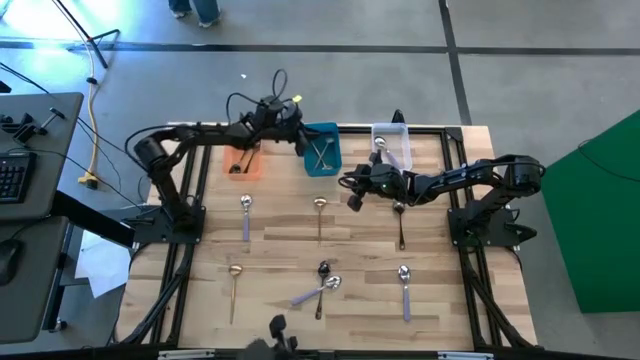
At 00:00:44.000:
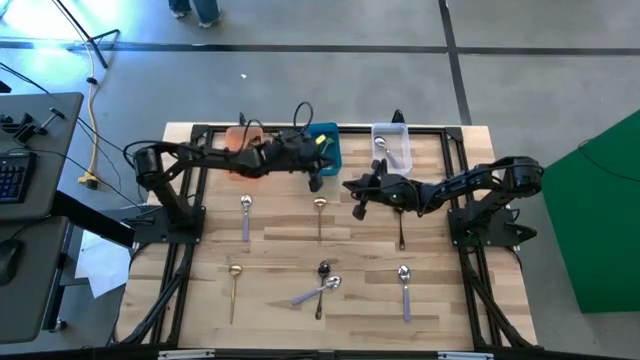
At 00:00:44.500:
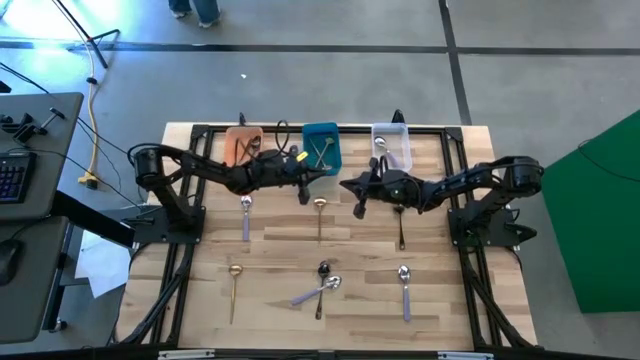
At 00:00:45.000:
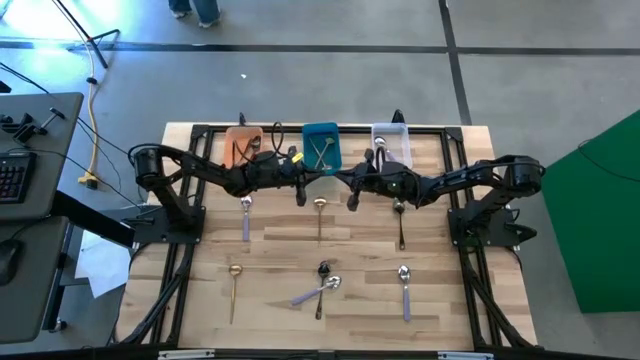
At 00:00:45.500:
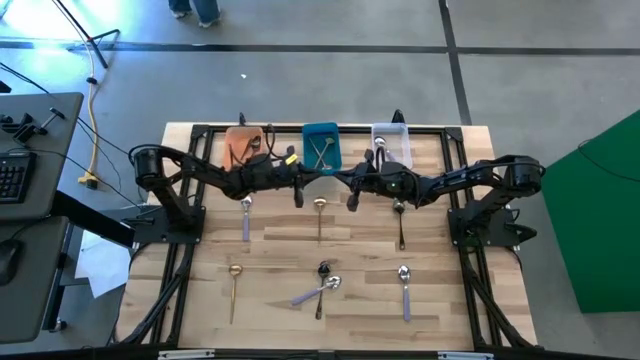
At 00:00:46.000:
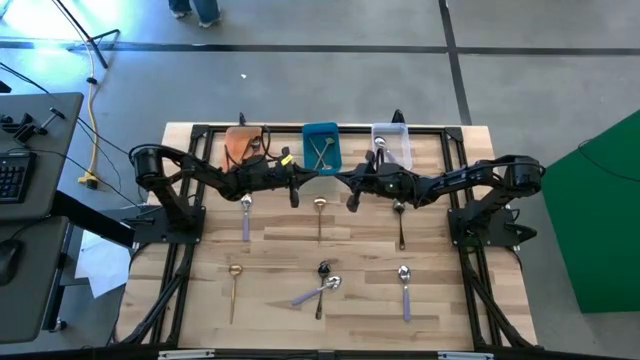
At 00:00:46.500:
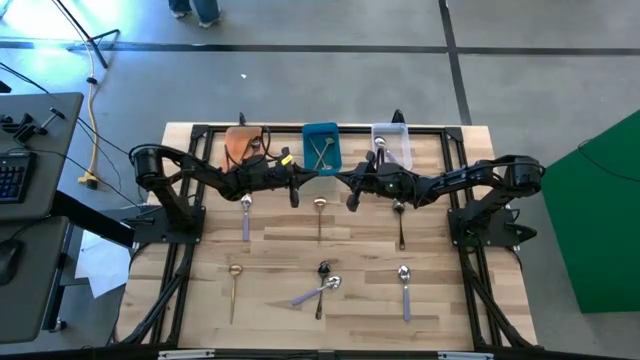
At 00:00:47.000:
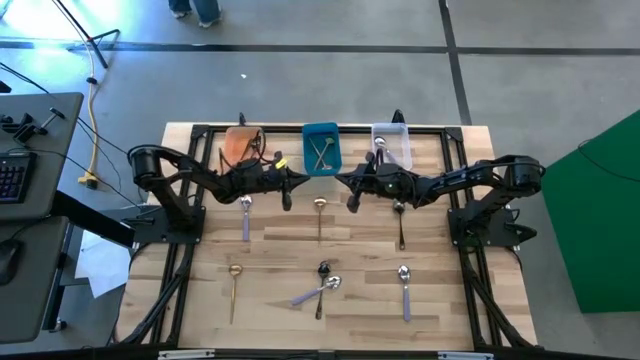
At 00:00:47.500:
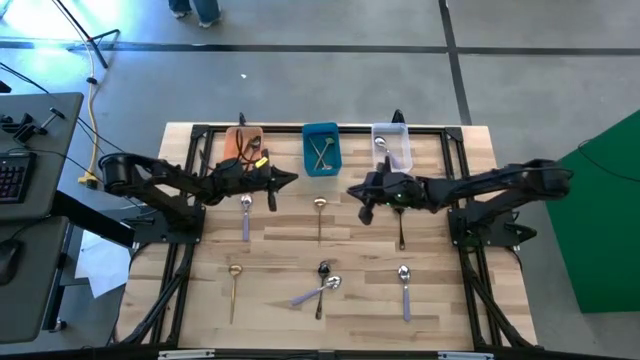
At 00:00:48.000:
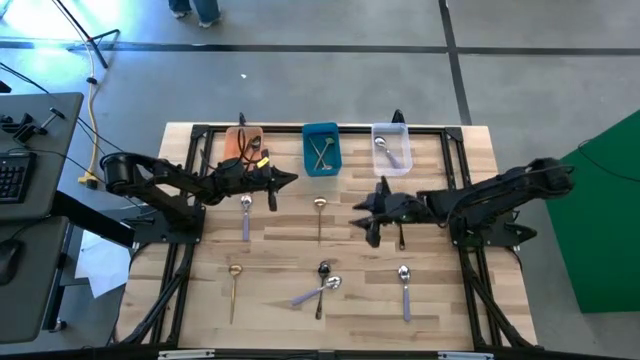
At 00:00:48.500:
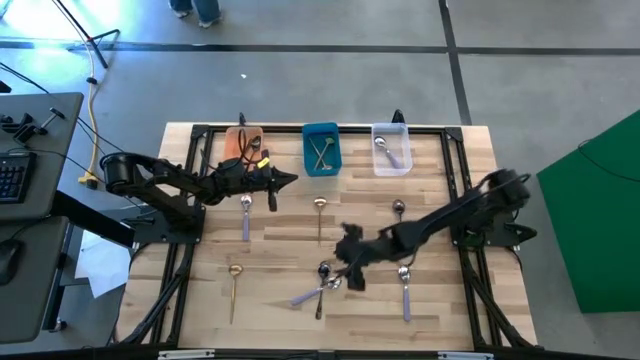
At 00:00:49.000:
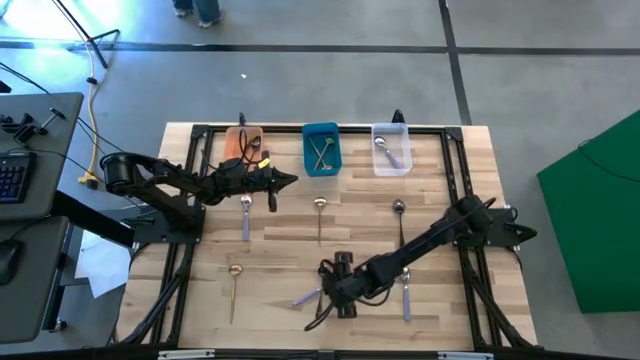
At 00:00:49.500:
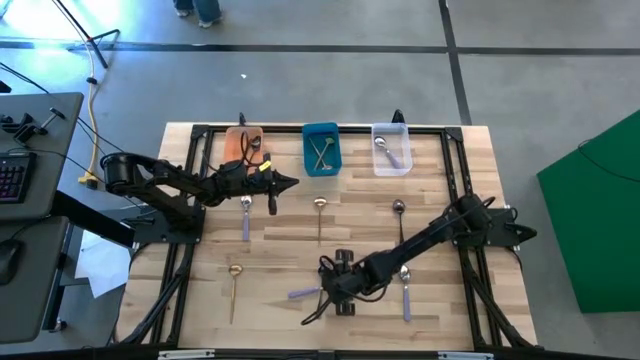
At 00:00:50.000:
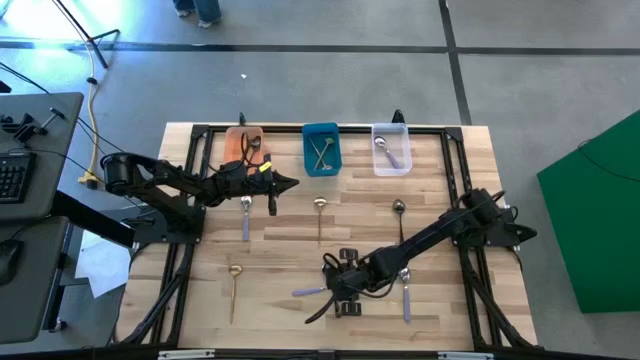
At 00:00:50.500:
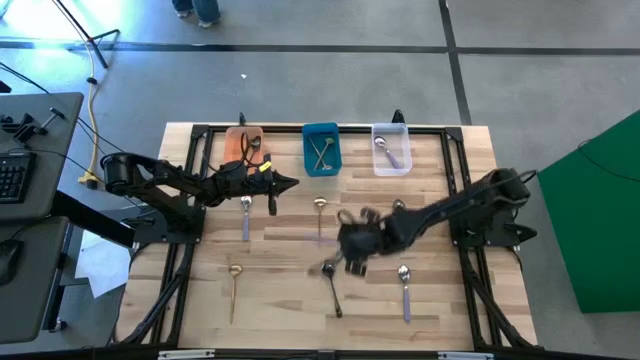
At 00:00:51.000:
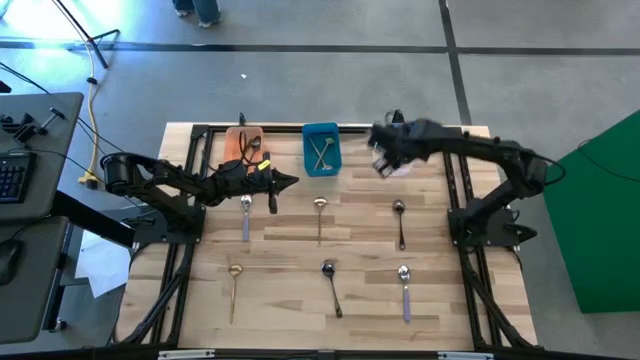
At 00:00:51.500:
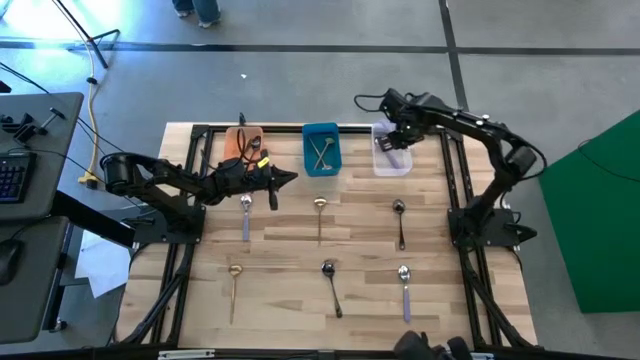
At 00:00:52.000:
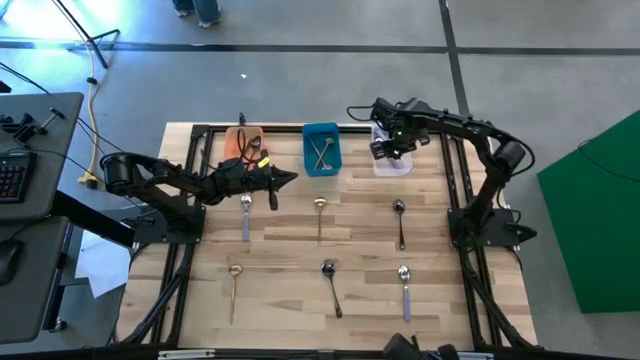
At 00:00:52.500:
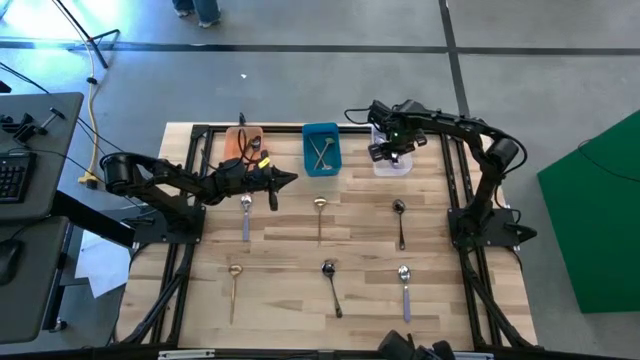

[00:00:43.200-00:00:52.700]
Task: Sort silverware by color (type)
Put the middle purple spoon into the transparent bin

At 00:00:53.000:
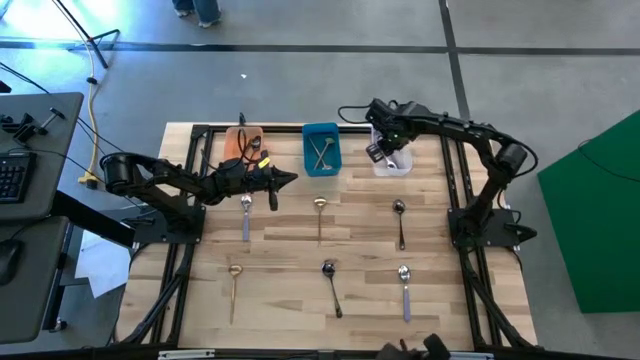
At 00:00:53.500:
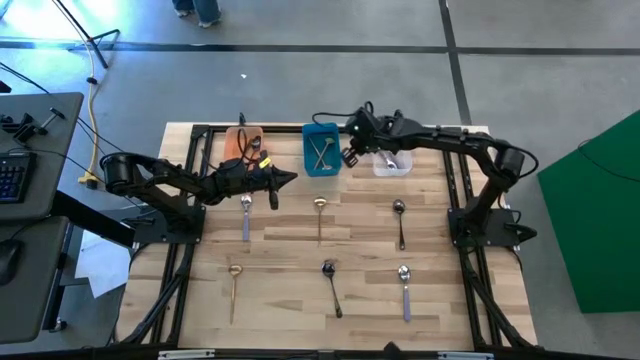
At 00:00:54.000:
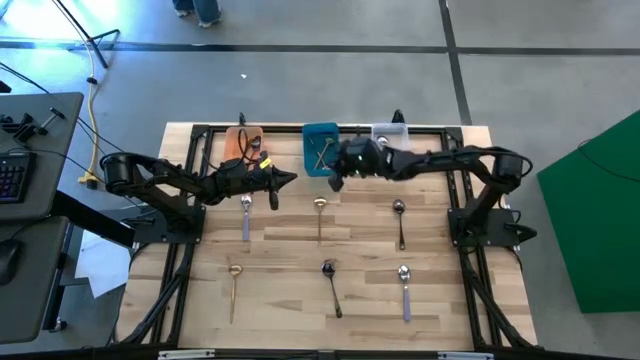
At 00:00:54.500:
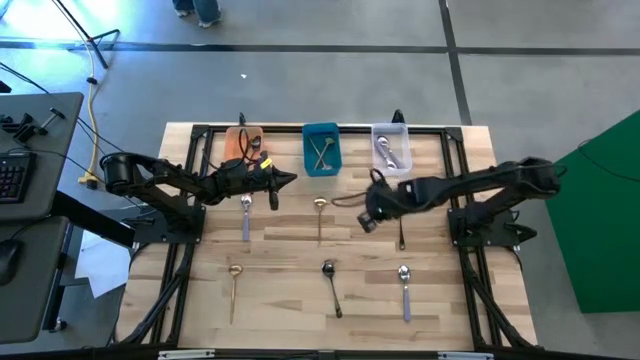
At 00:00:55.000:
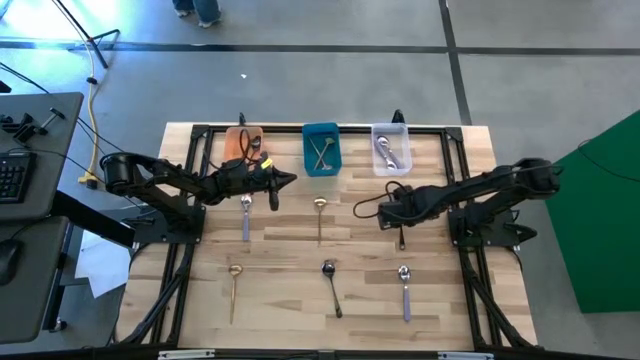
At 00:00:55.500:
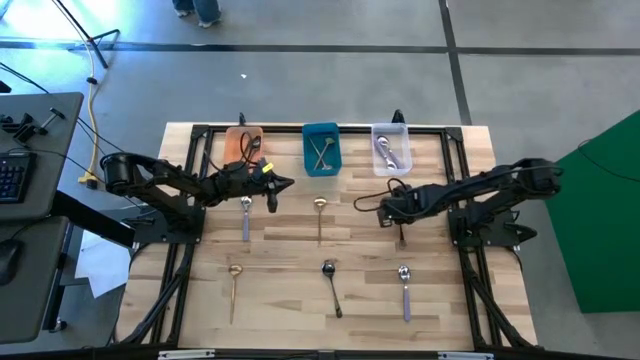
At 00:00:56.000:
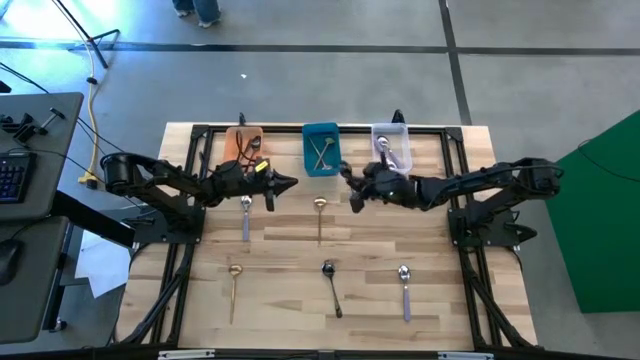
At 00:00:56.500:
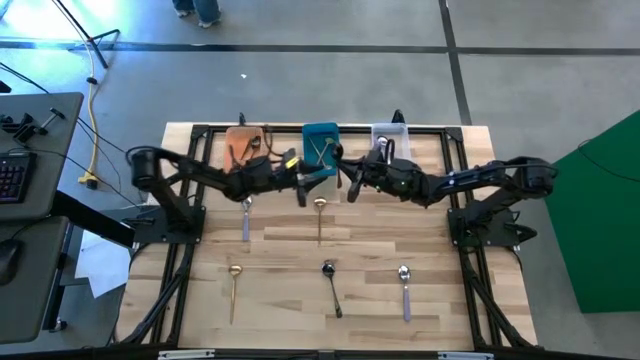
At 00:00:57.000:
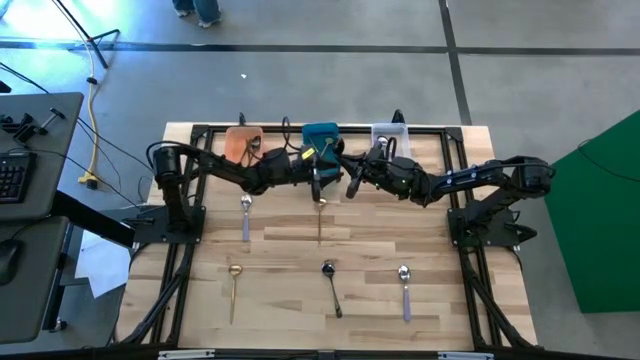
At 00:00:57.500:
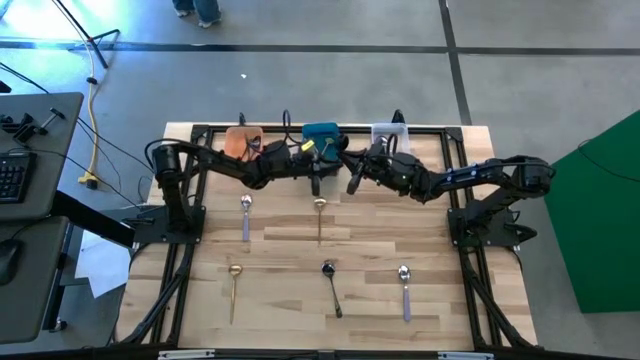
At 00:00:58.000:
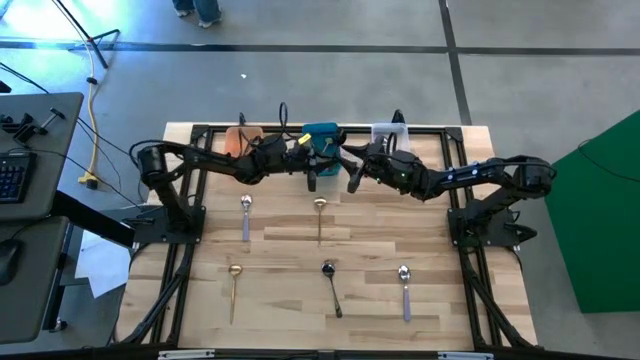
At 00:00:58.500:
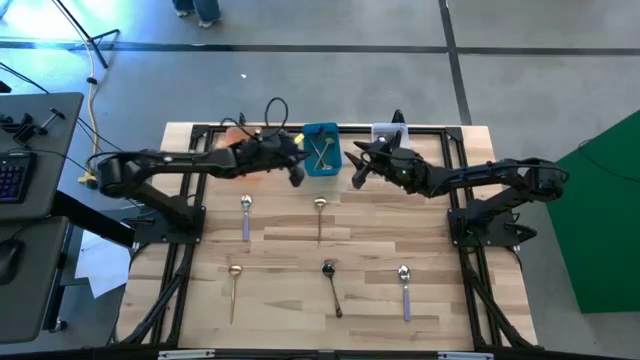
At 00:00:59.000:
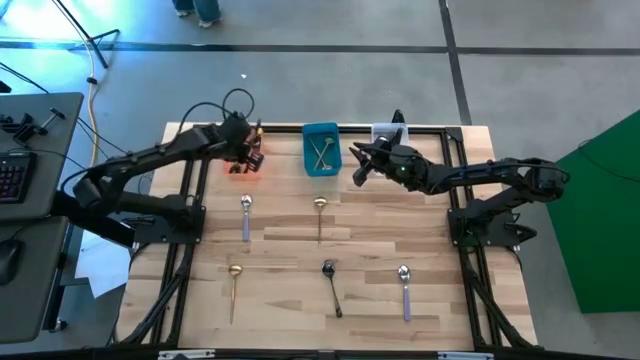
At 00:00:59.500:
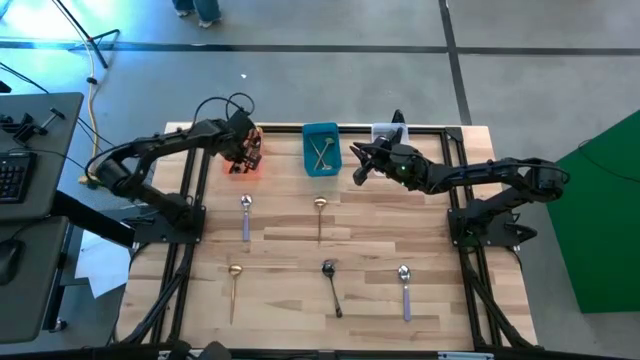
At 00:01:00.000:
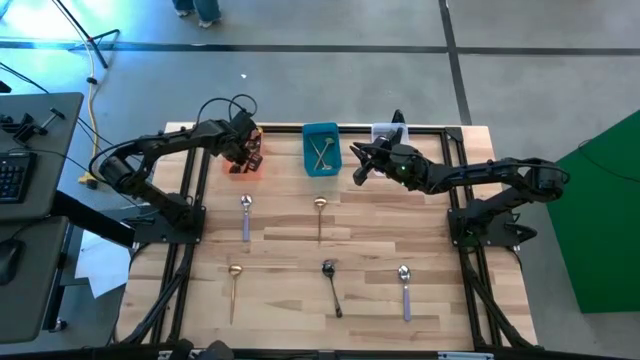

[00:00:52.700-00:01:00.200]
Put the top black spoon into the orange bin

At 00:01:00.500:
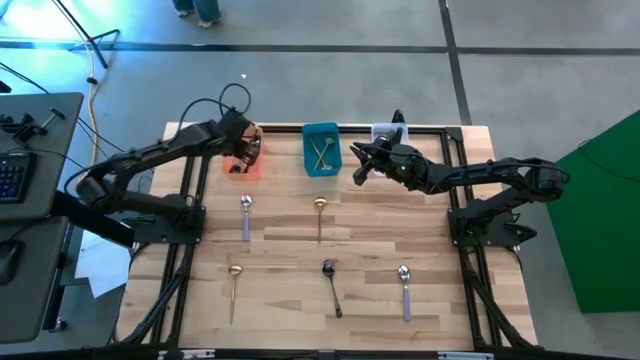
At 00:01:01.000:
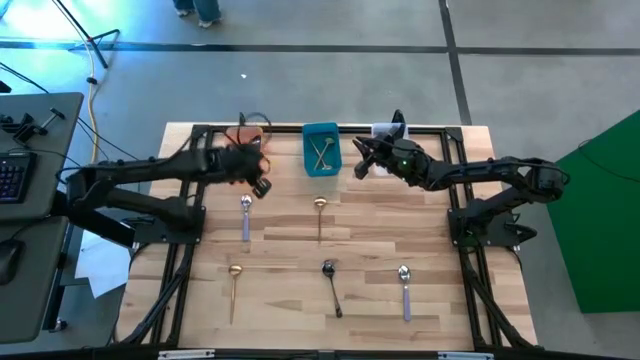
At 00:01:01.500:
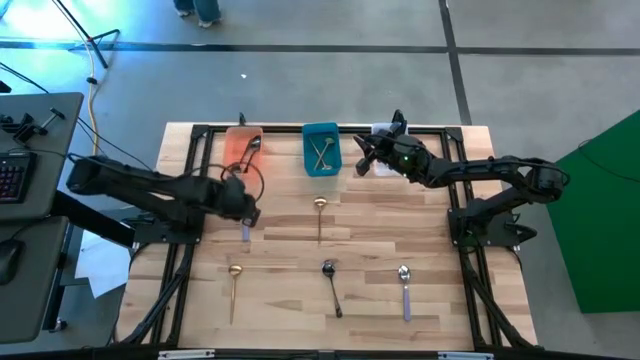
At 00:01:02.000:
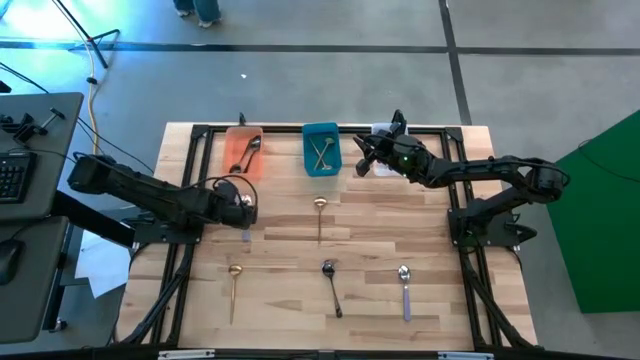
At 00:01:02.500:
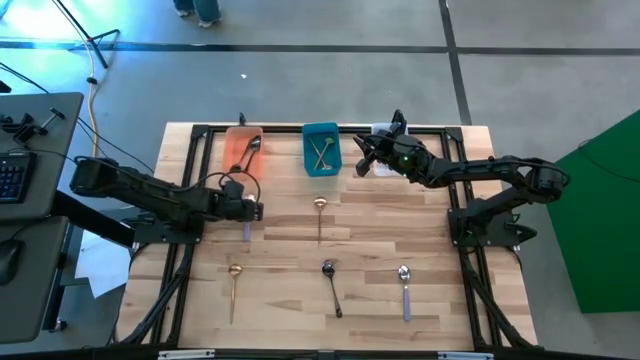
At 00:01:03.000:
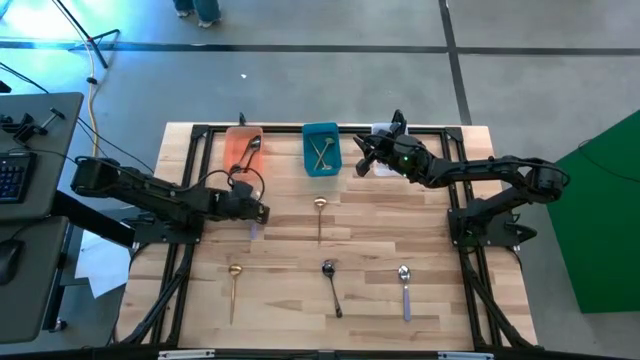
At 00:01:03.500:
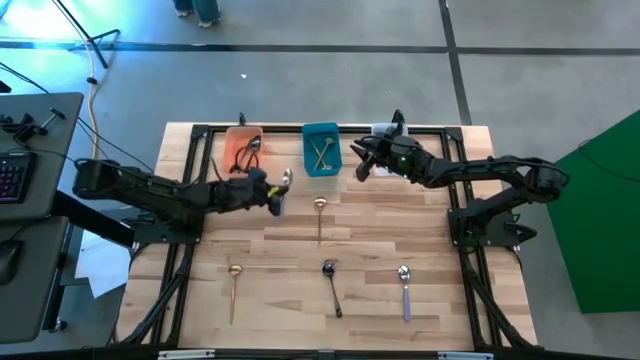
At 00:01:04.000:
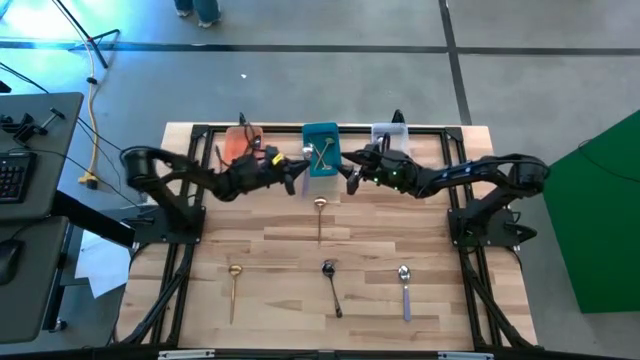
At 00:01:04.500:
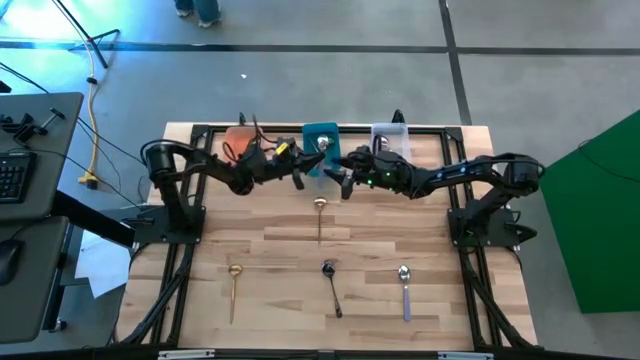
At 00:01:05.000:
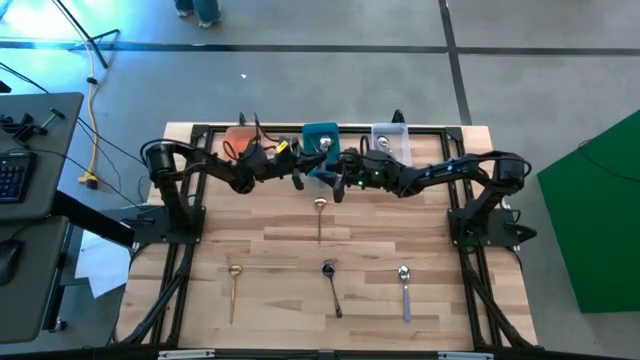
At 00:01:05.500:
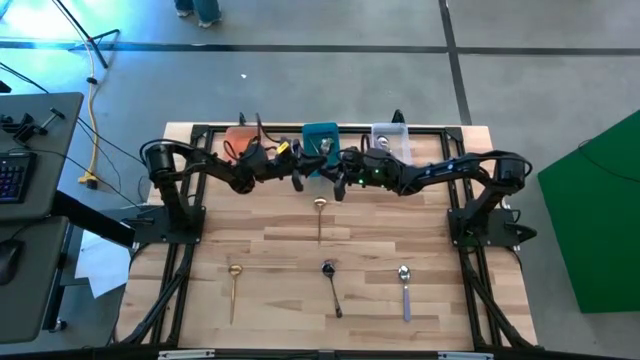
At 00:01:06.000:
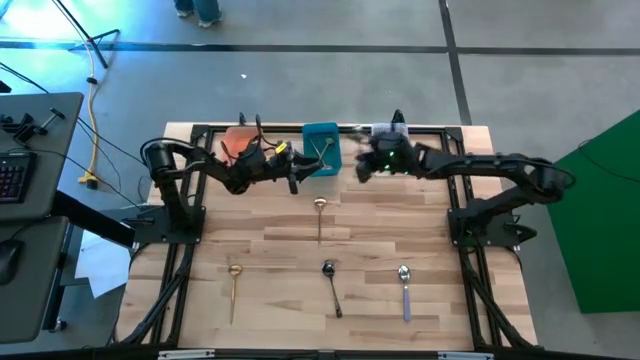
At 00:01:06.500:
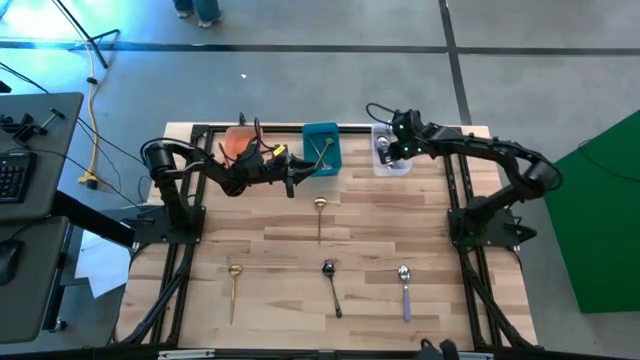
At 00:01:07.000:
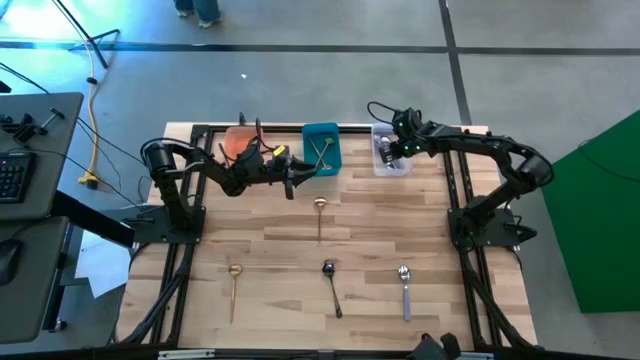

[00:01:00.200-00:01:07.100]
Put the top purple spoon into the transparent bin
